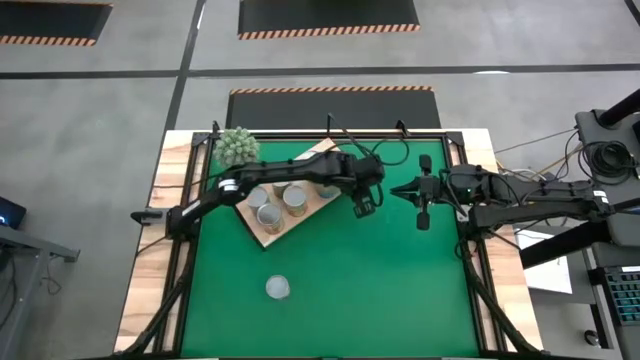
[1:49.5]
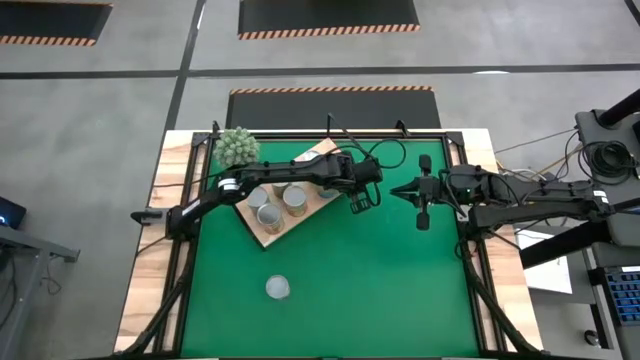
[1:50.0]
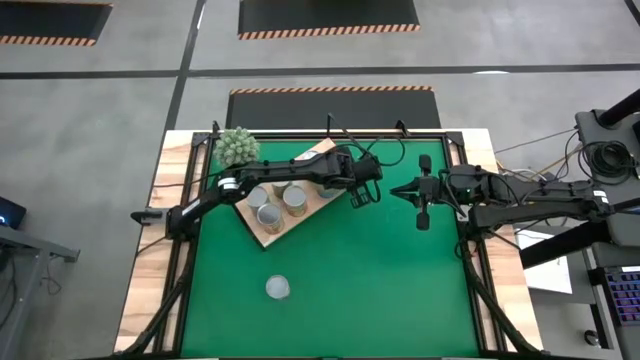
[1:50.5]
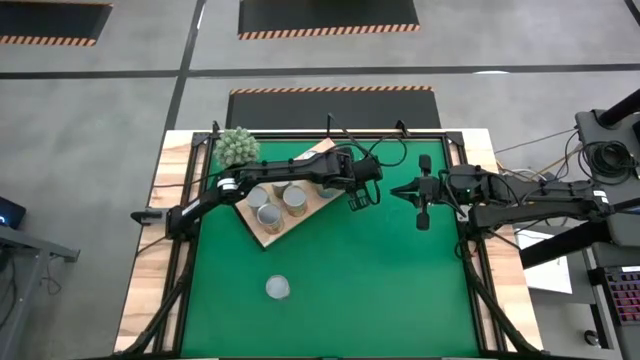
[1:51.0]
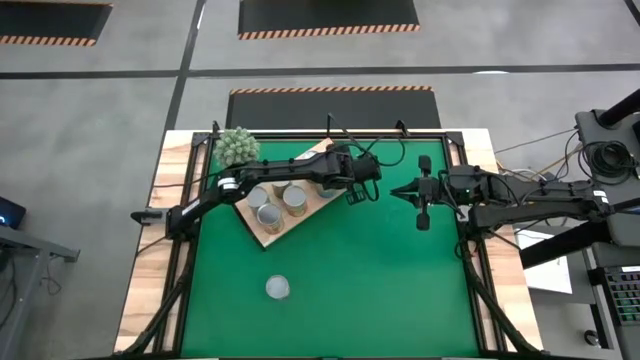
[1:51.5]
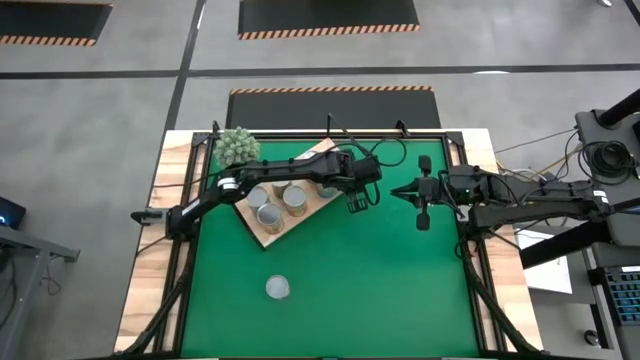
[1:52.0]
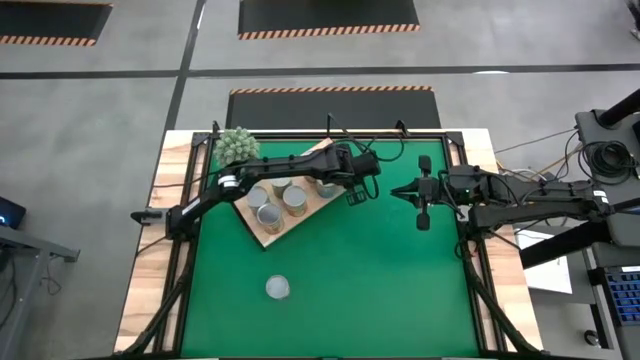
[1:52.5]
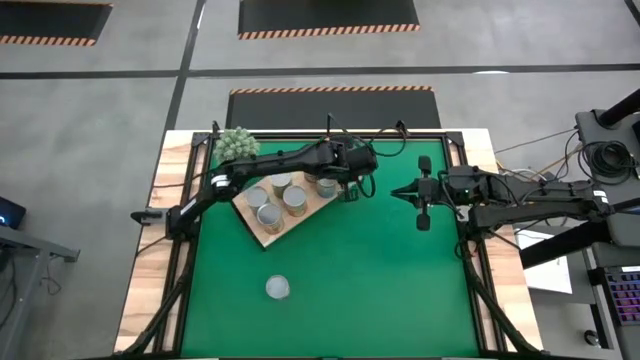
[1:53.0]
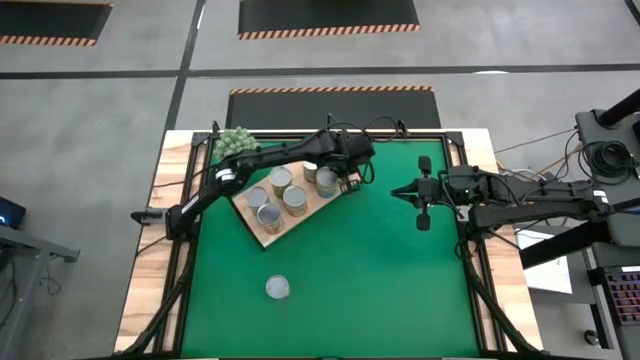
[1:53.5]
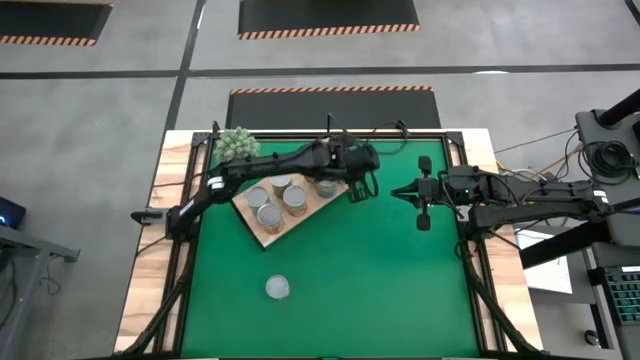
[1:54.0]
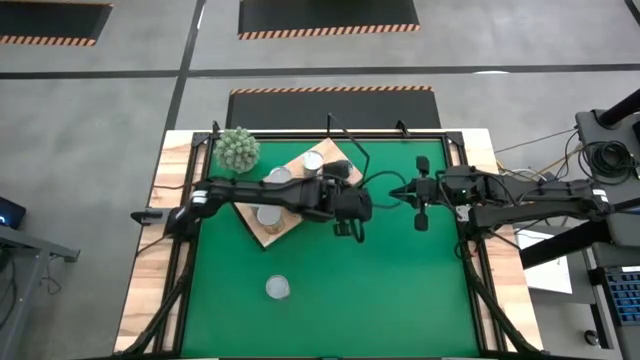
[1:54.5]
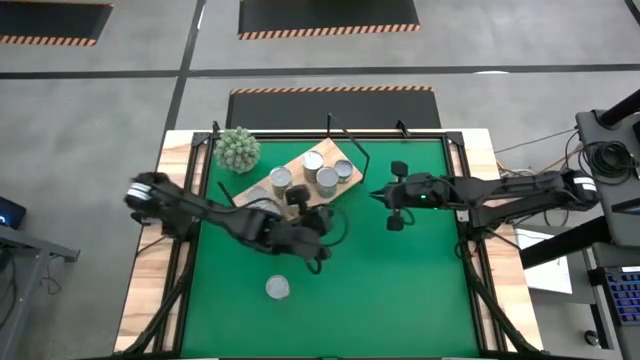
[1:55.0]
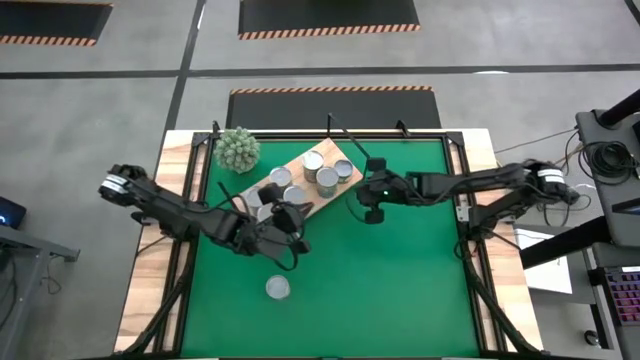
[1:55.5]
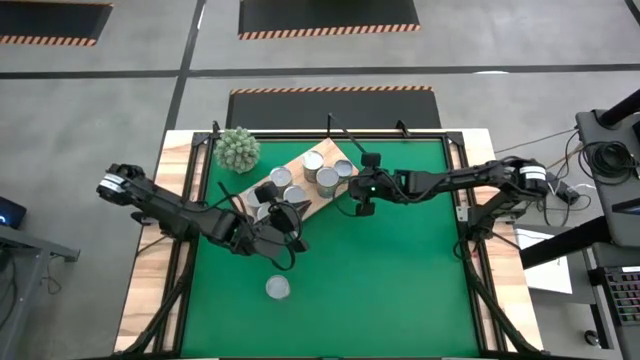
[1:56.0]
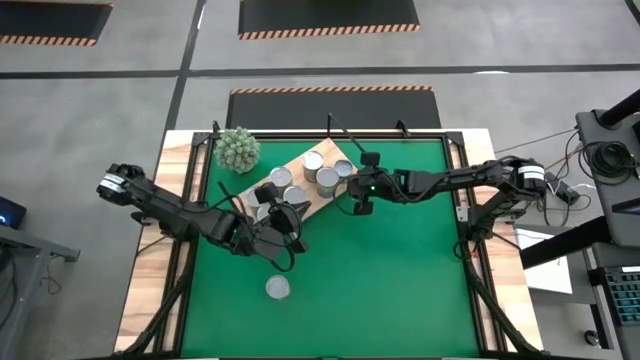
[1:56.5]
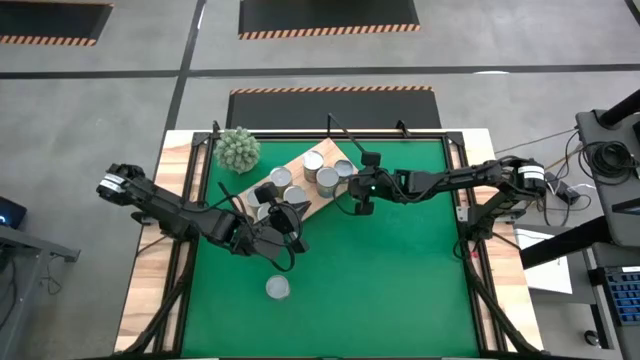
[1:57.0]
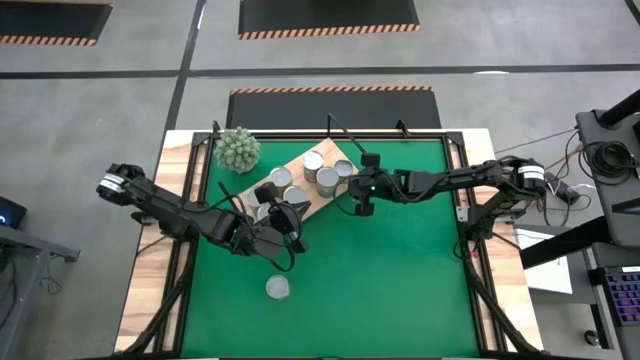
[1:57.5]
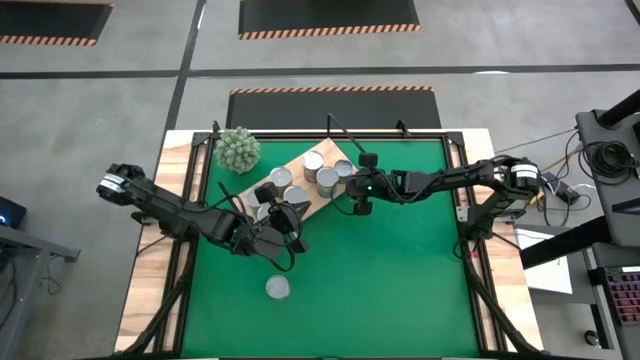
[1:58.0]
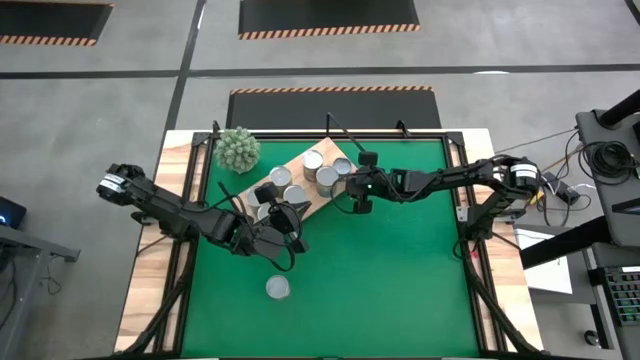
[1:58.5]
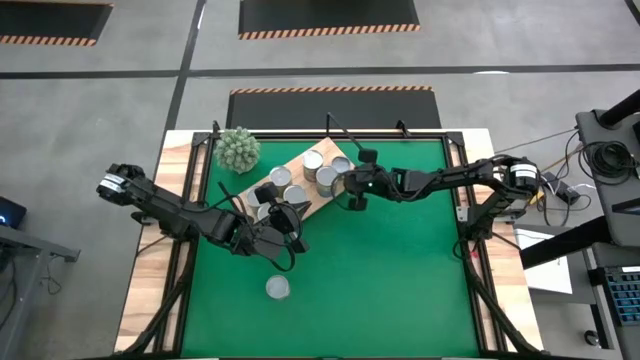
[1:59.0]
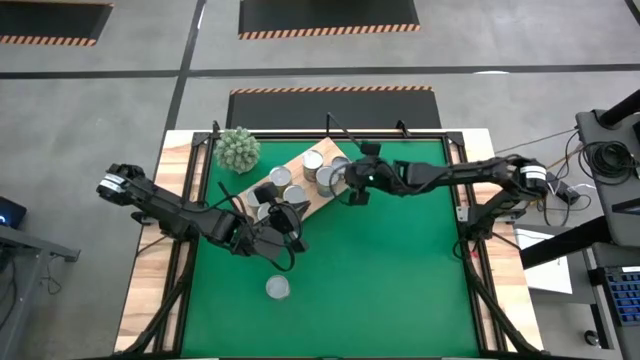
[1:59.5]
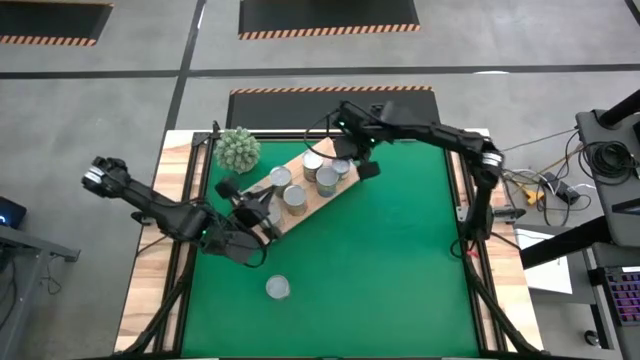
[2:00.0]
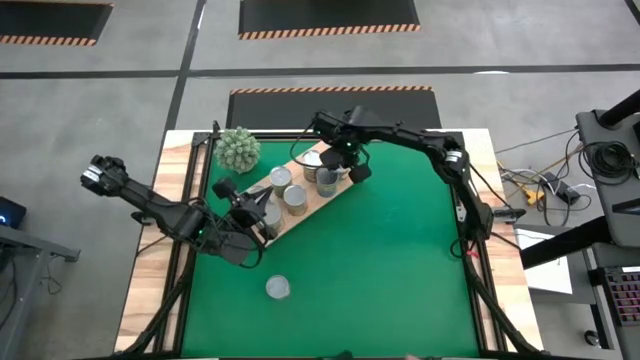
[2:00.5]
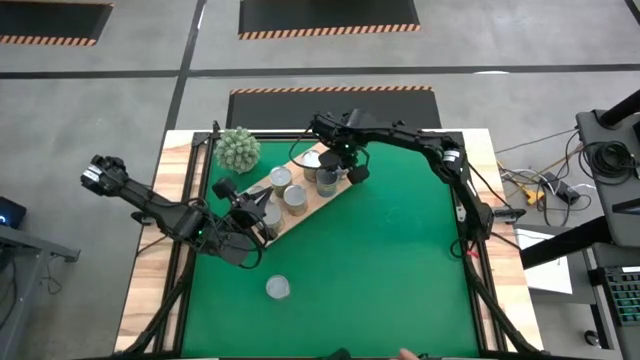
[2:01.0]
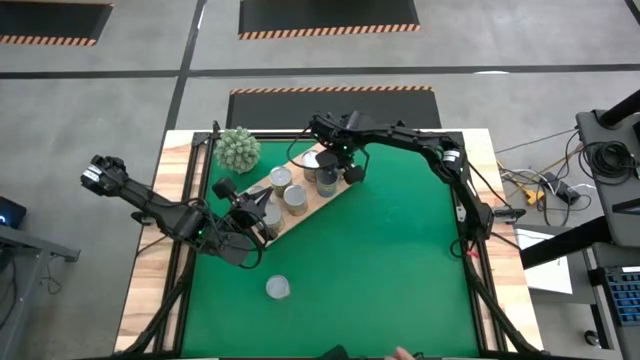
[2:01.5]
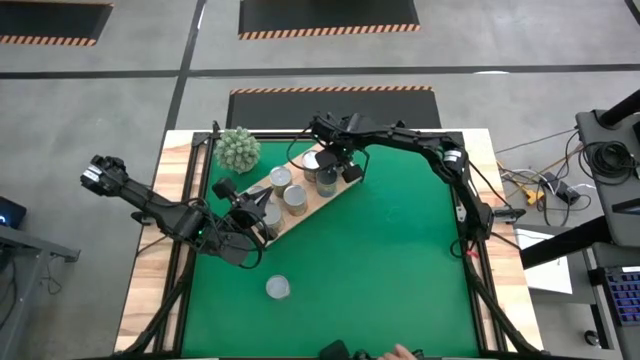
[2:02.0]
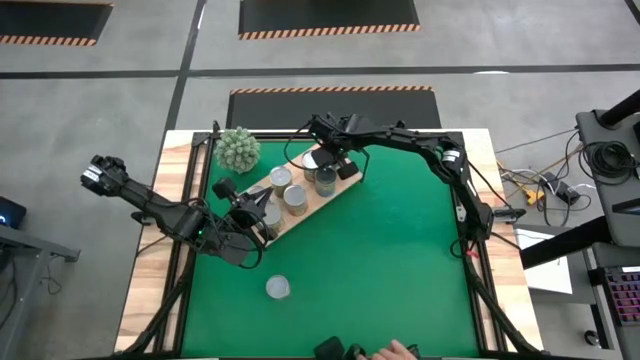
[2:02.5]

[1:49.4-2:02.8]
Task: Pick and place cans onto a shelf
Put the canned sliced peaches on the shelf

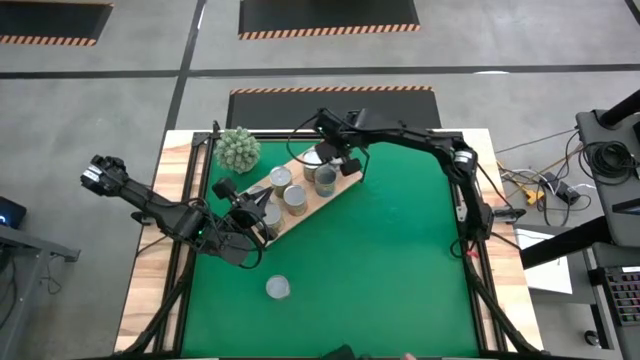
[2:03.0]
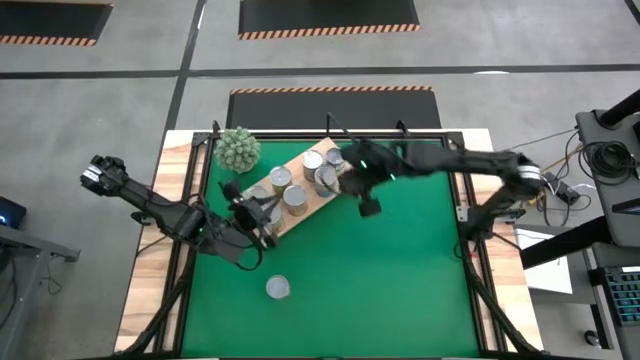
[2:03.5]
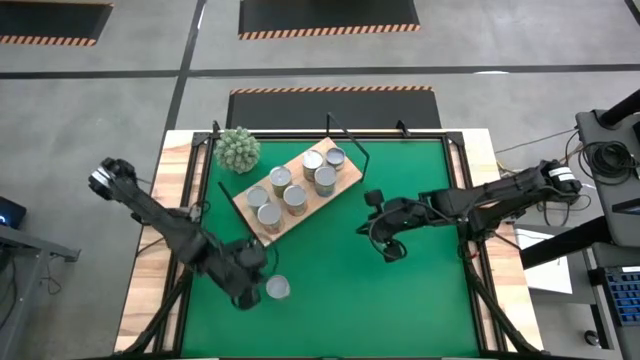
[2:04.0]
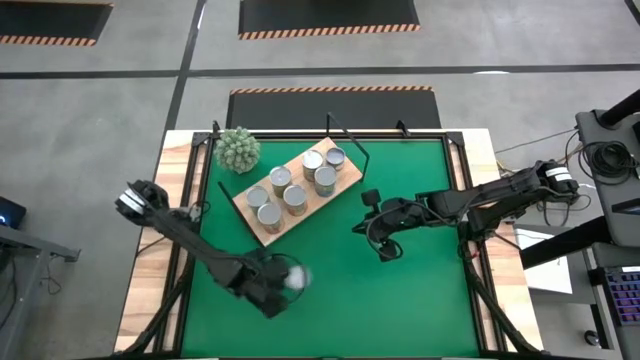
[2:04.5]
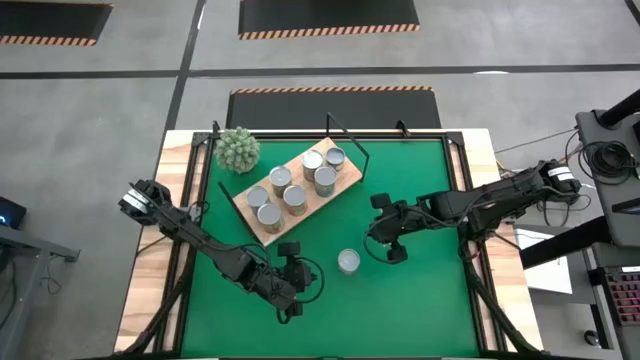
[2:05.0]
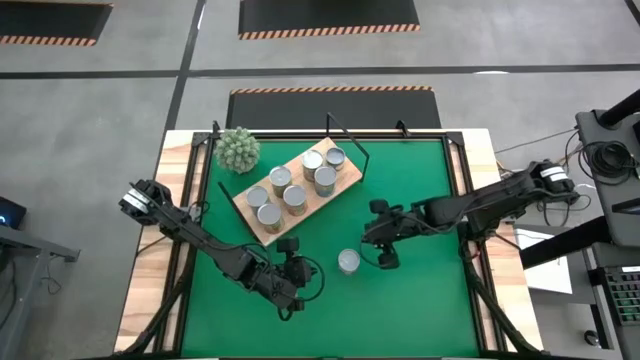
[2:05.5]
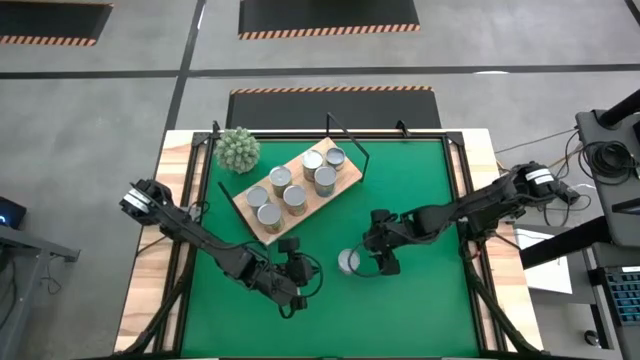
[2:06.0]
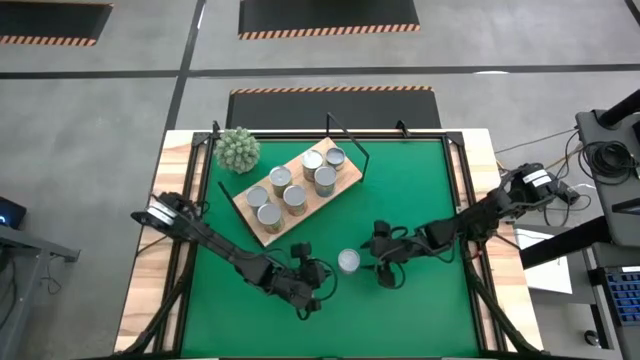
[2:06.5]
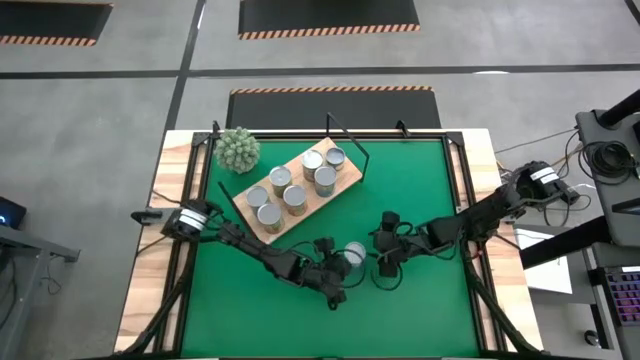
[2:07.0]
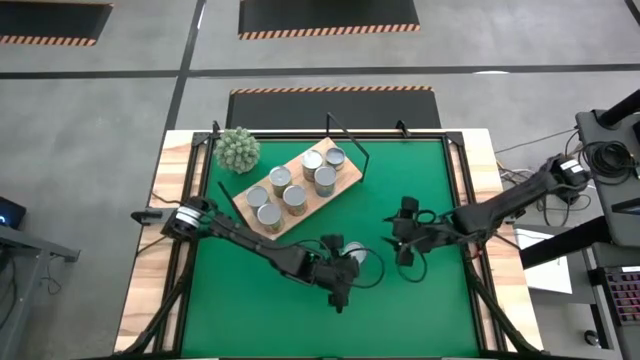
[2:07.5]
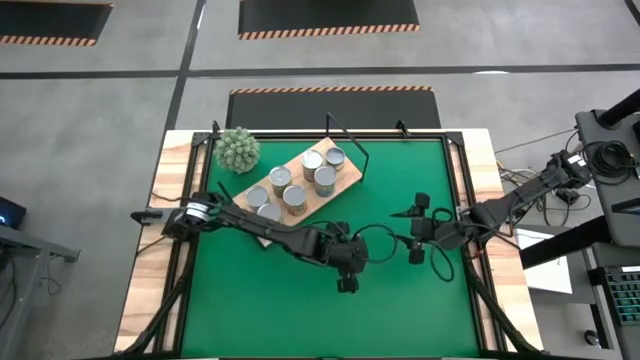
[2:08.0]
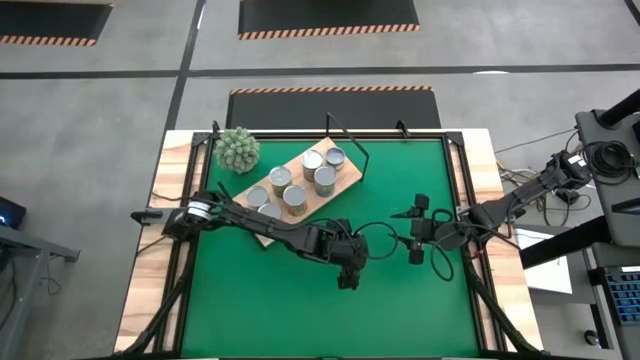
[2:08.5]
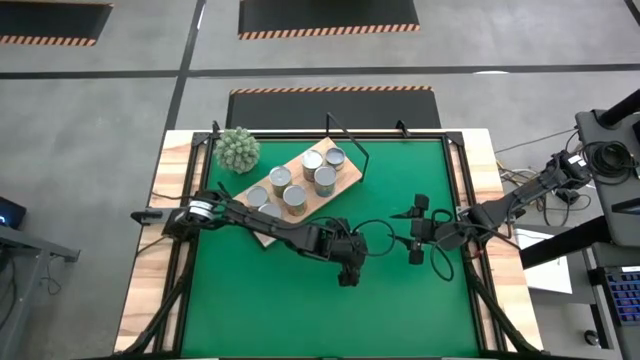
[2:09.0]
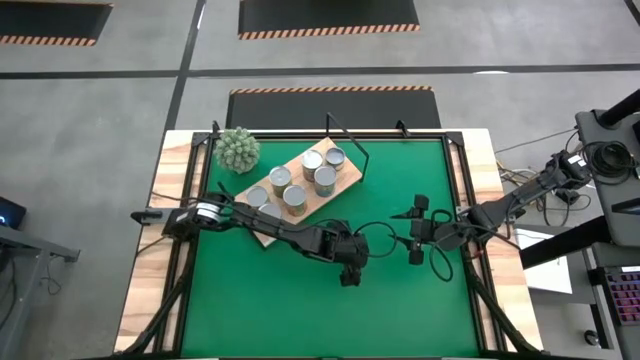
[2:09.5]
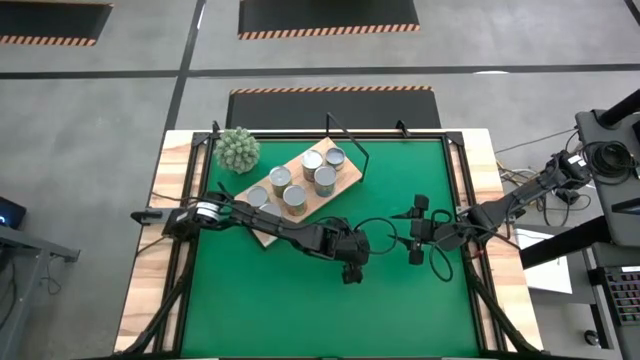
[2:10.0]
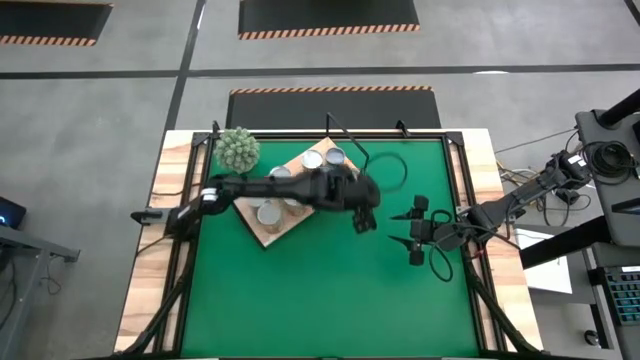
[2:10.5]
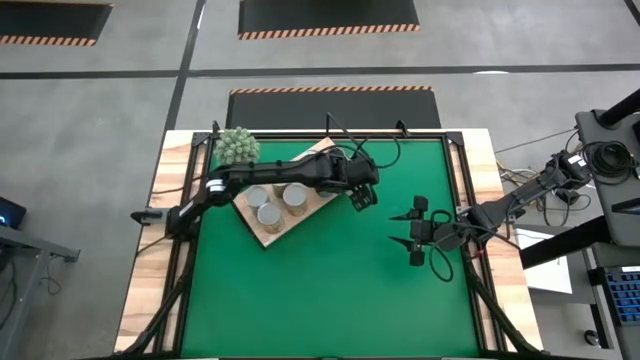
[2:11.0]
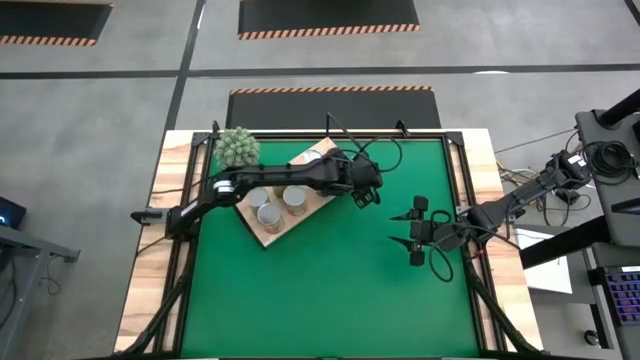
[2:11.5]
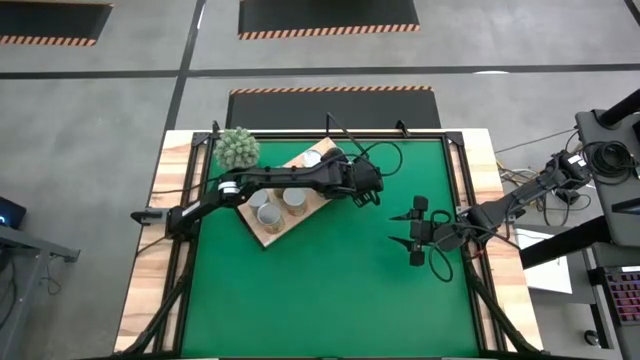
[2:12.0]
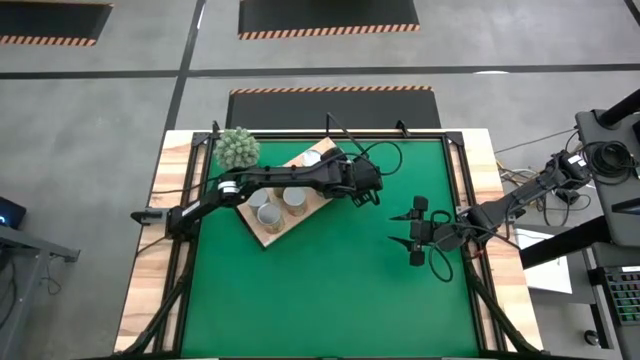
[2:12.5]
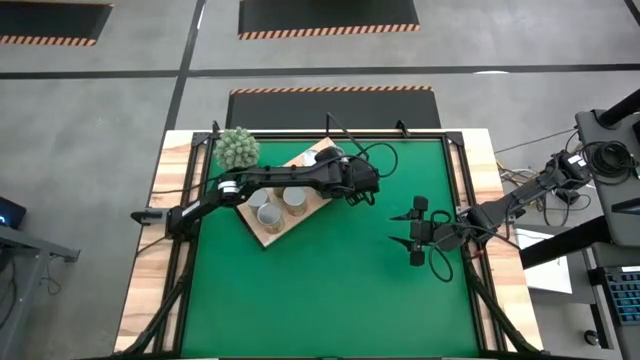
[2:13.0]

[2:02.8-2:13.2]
Put the canned sauce on the shelf
